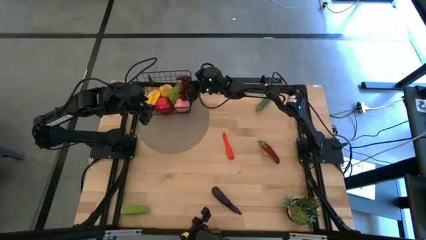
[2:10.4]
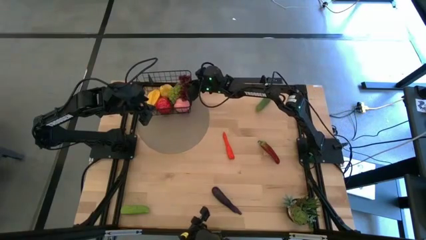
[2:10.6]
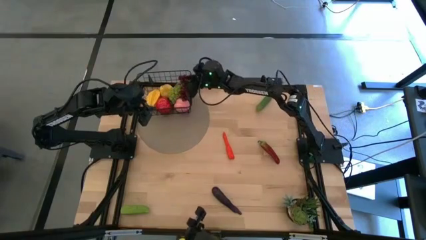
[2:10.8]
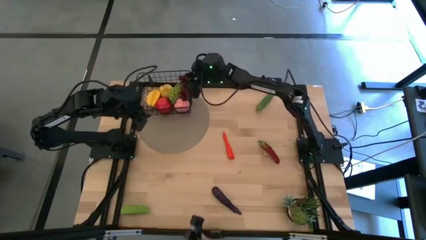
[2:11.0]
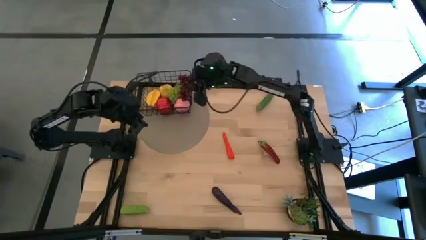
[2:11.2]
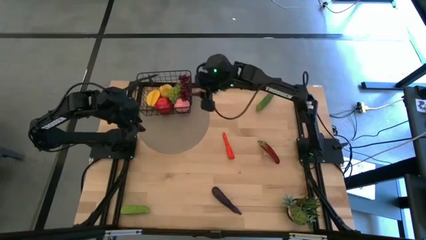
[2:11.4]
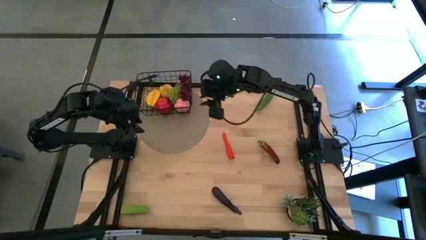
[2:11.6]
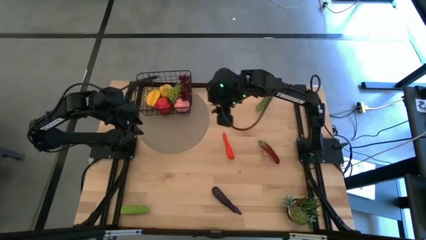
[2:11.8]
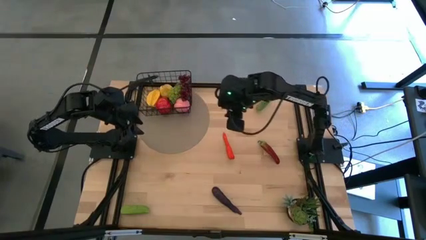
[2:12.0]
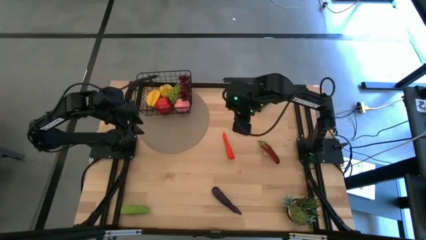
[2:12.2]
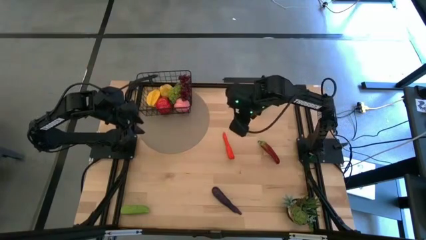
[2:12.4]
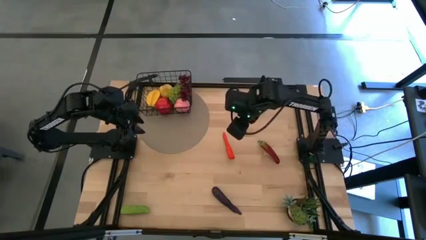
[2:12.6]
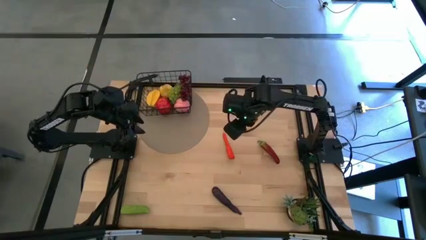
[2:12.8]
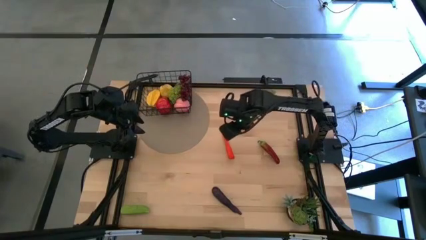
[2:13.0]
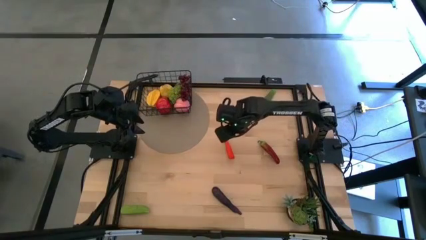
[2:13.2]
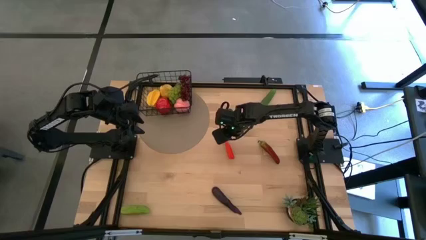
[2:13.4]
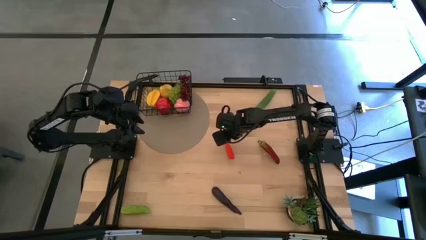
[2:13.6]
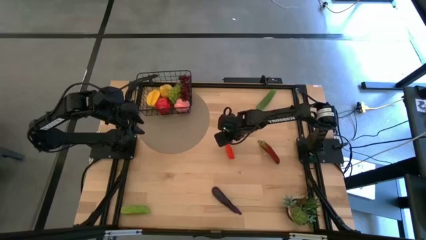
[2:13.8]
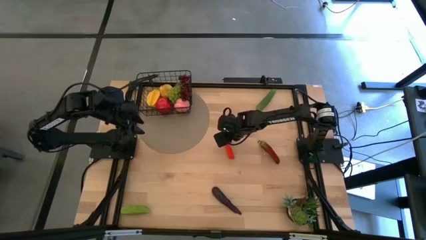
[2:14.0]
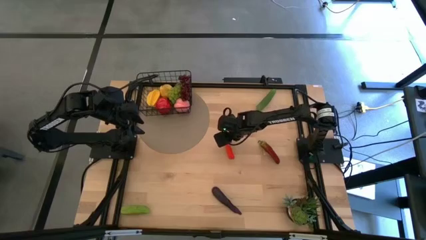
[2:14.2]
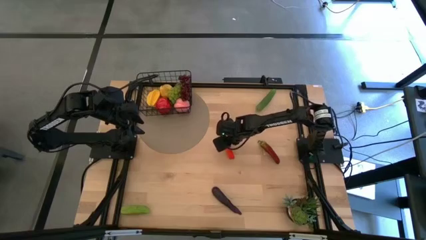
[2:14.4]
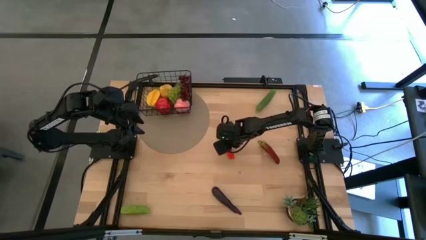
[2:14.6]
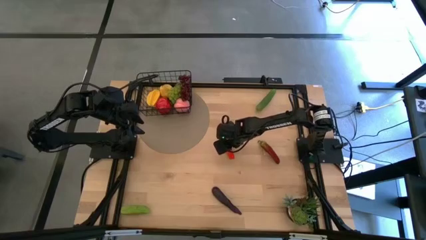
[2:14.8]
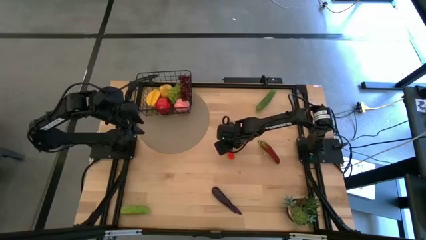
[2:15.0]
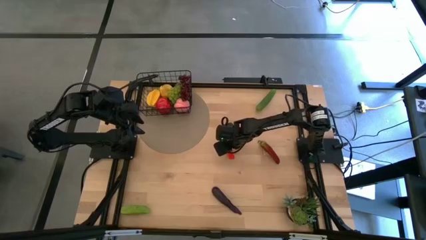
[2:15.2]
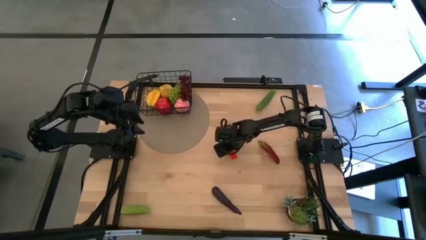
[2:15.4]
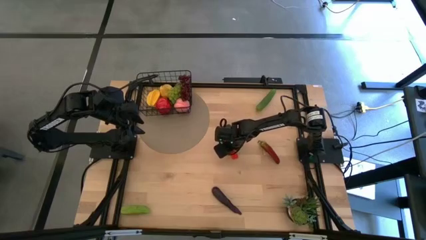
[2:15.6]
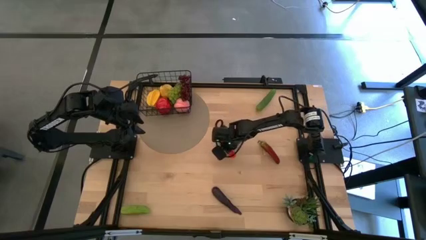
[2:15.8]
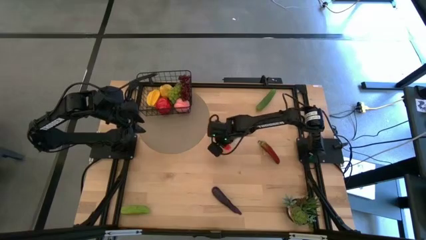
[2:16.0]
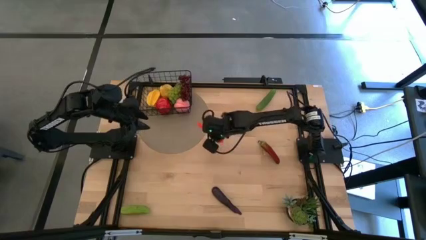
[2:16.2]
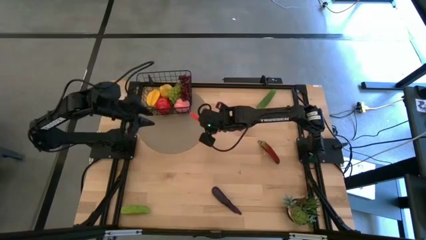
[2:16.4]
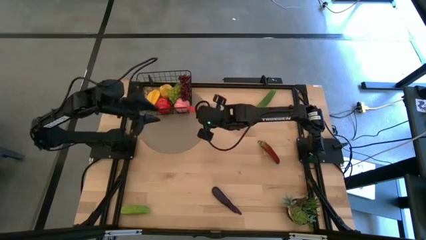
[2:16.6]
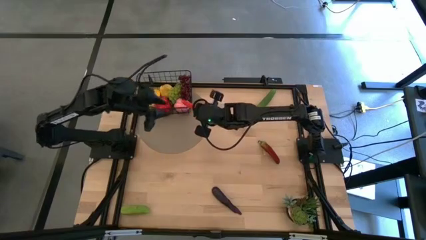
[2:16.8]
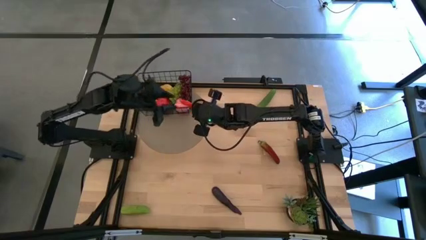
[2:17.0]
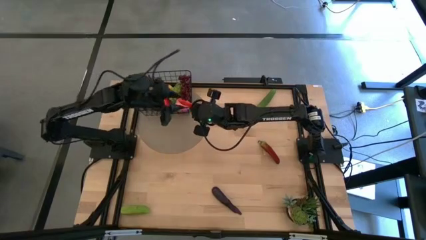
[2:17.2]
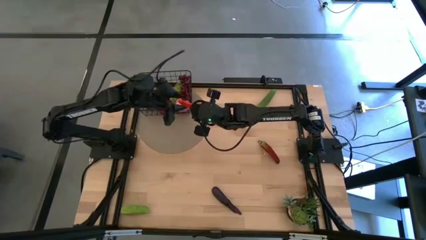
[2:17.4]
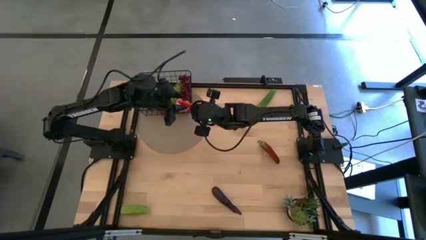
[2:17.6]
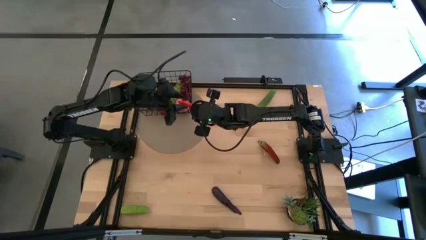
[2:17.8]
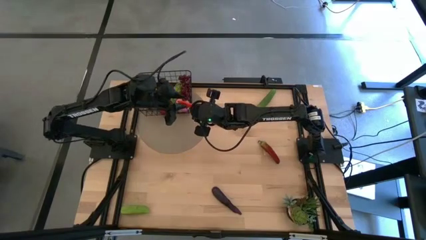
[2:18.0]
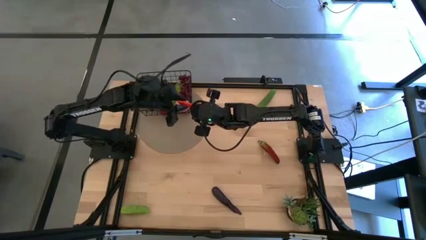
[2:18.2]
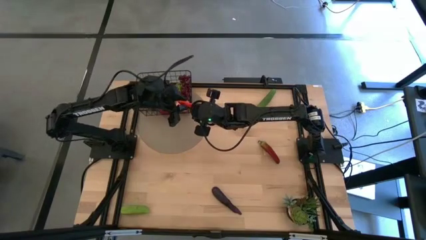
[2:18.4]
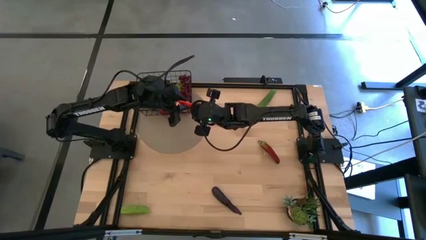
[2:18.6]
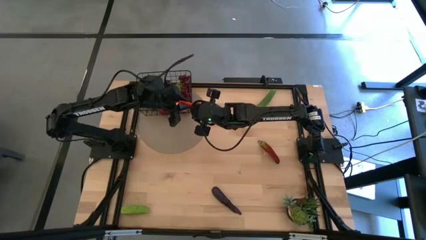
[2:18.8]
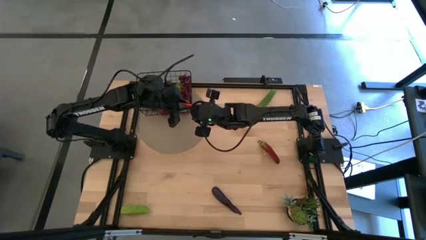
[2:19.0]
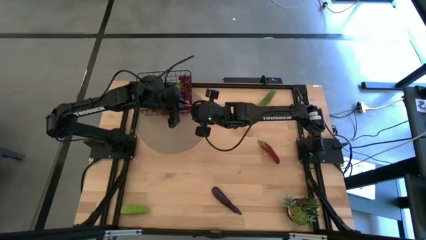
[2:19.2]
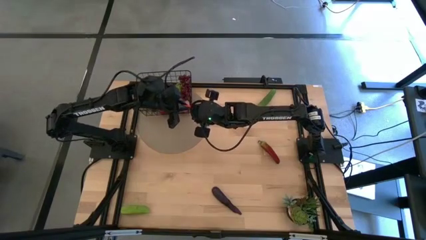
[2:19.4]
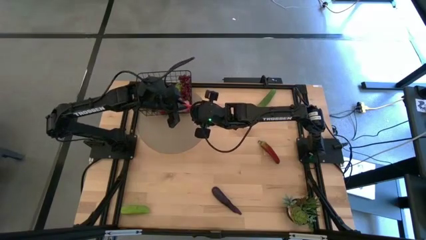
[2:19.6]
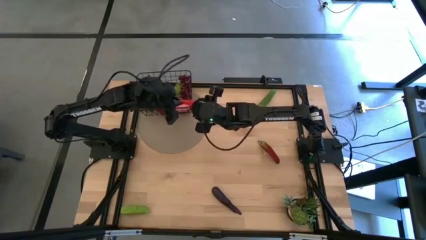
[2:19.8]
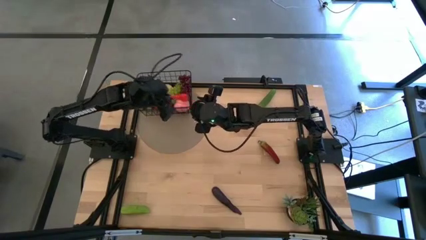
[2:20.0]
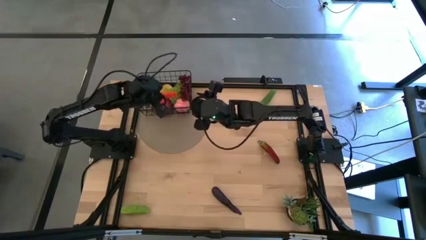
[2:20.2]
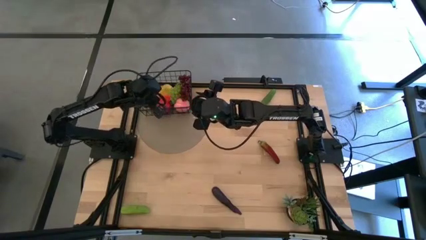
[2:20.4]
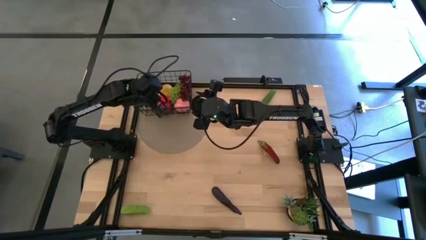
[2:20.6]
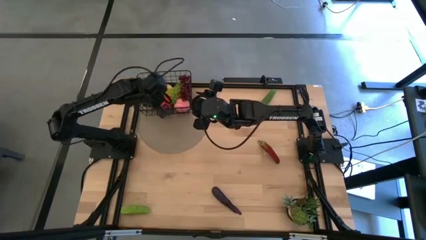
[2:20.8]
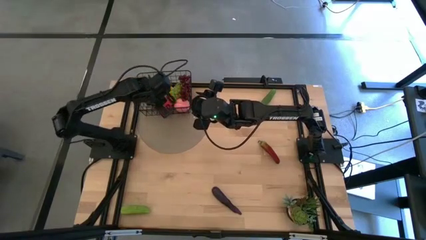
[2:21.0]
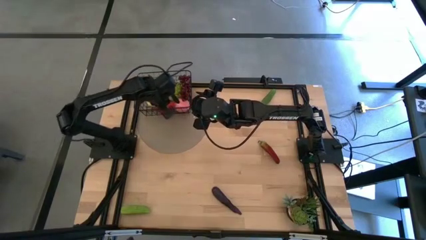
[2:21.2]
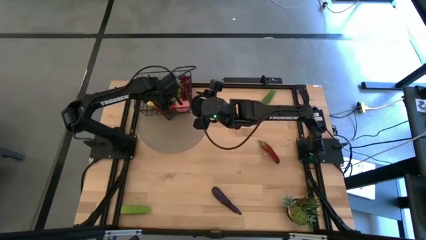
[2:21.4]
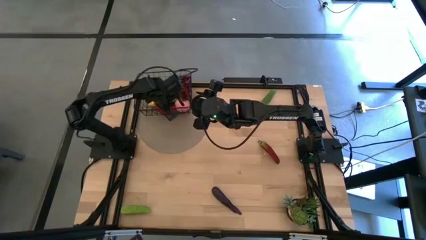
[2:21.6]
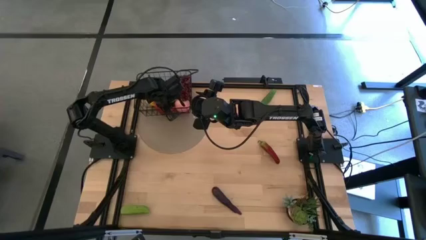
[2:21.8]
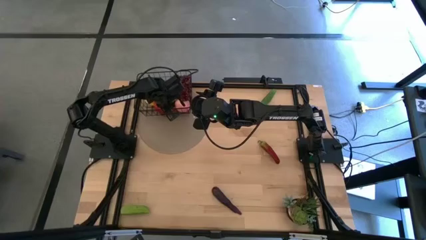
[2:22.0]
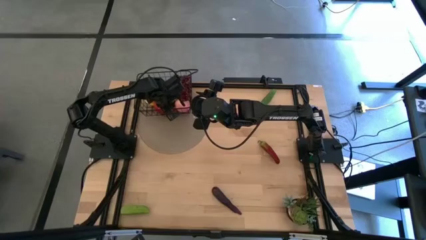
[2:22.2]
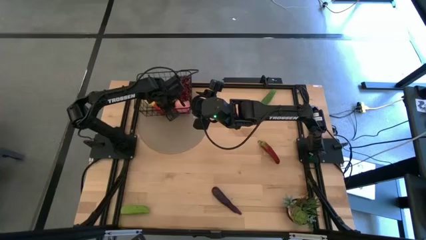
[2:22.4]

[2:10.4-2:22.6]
Task: Build produce basket
Put the orange carrot into the black wire basket

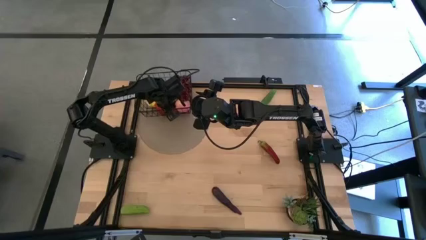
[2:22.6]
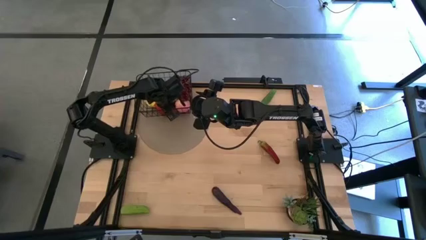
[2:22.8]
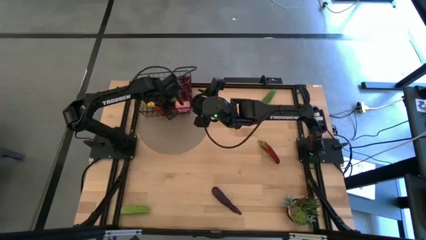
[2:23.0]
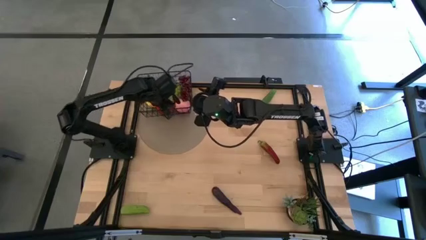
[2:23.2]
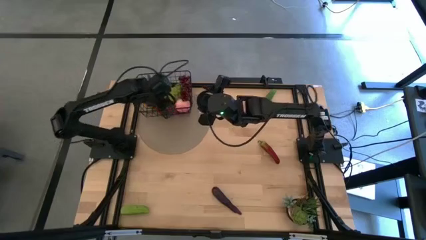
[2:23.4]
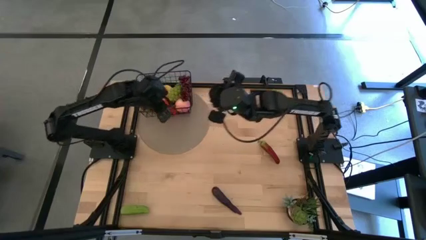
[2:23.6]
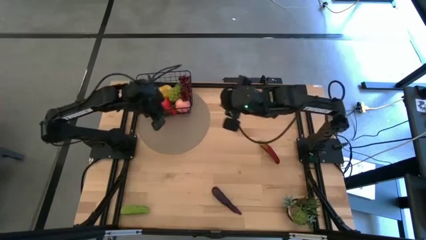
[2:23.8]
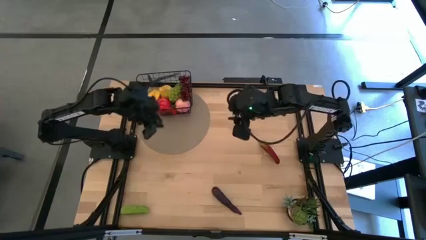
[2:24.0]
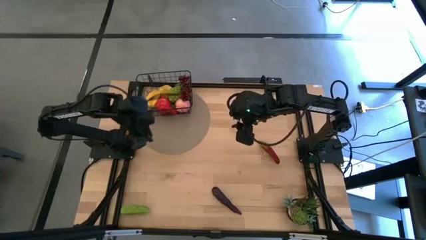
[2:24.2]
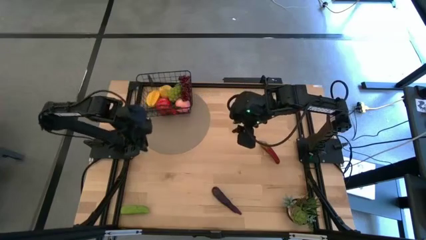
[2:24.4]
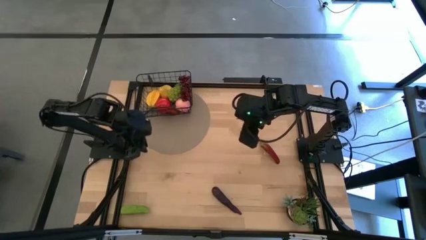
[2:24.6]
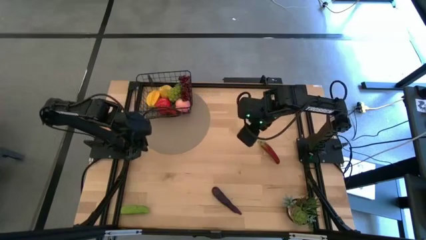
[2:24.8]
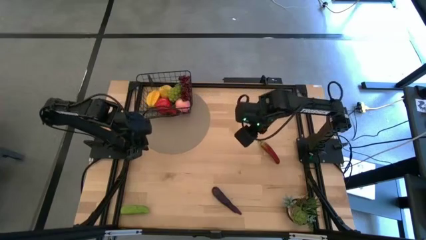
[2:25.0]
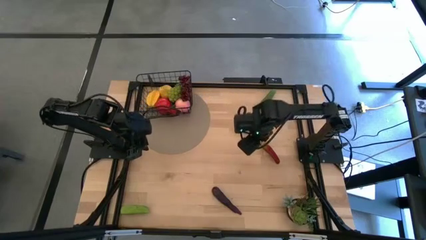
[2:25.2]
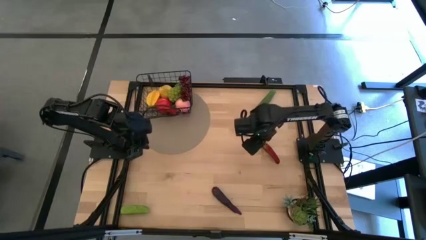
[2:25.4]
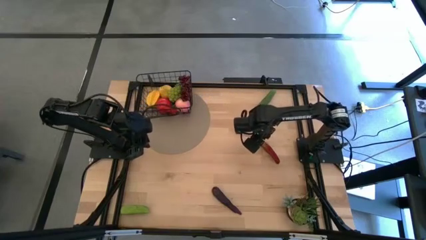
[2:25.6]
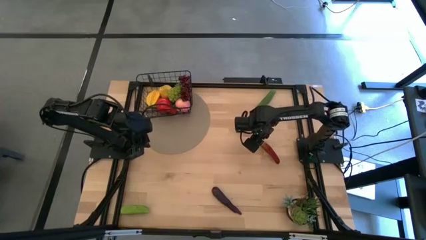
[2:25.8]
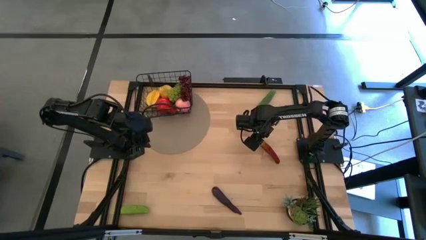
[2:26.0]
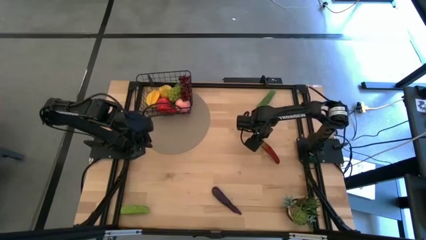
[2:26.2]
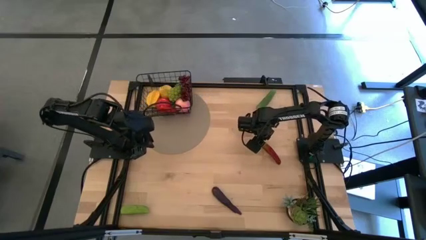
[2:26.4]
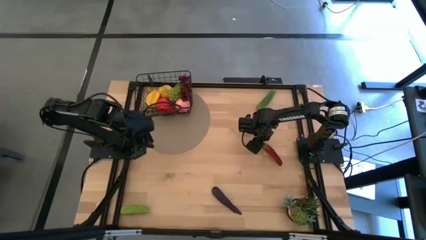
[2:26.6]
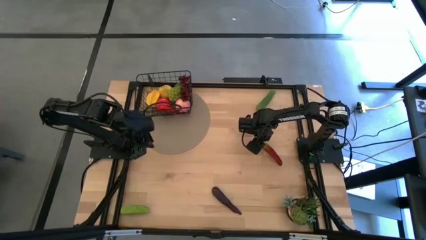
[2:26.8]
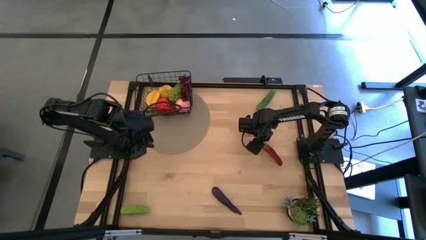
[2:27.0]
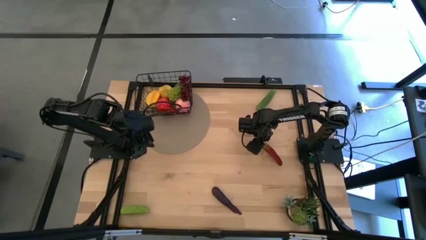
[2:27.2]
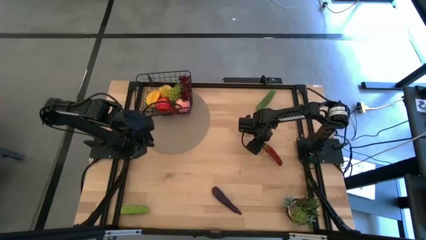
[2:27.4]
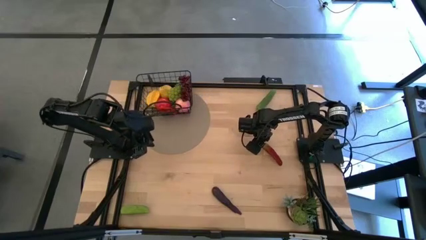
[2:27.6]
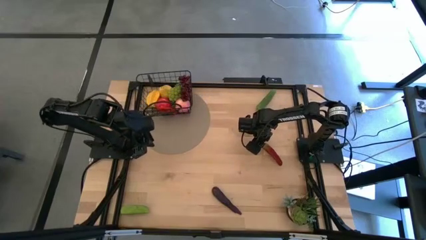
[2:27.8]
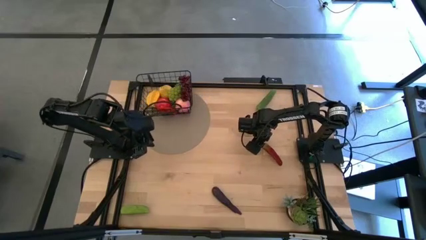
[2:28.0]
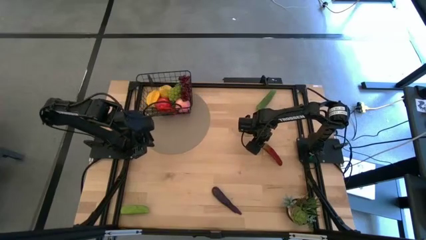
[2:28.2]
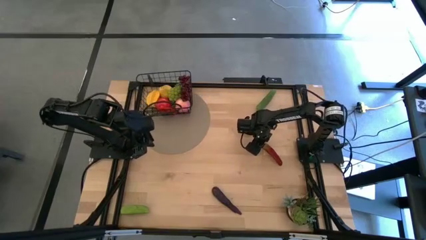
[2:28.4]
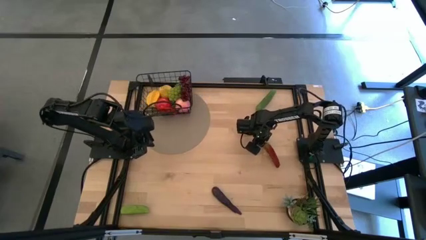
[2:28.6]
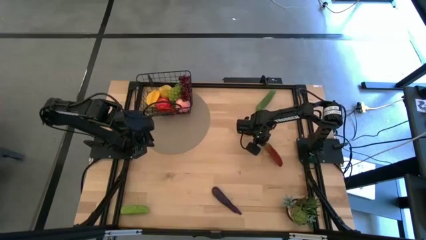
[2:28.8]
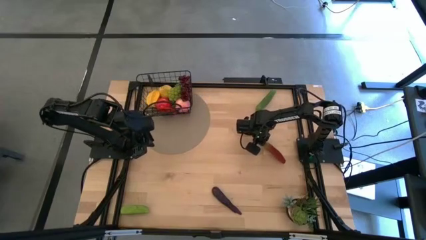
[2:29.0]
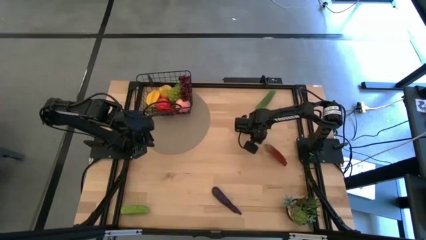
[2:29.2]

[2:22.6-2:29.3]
Put the red chilli pepper into the black wire basket
